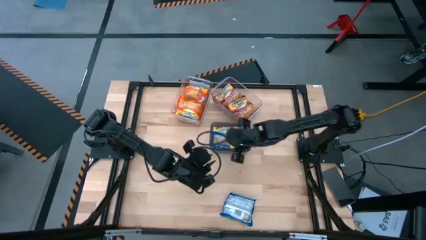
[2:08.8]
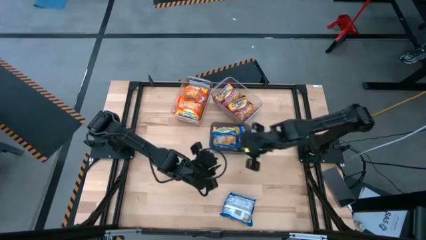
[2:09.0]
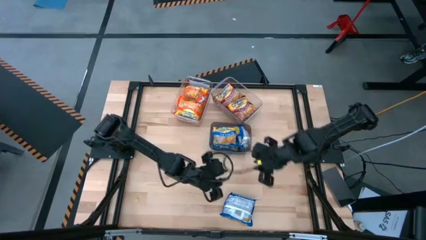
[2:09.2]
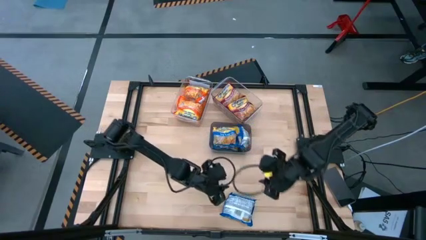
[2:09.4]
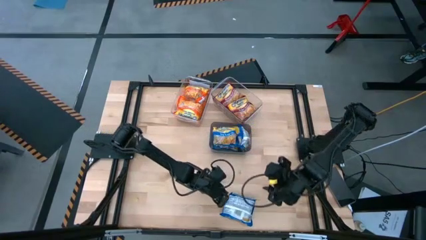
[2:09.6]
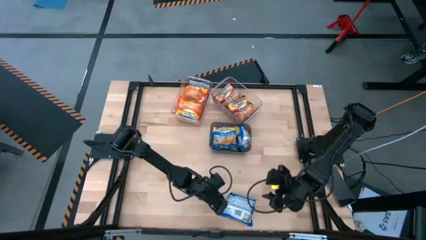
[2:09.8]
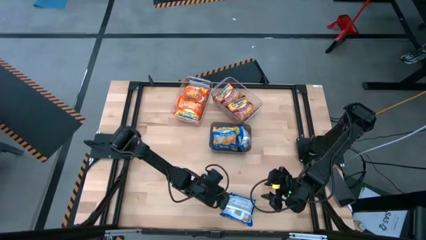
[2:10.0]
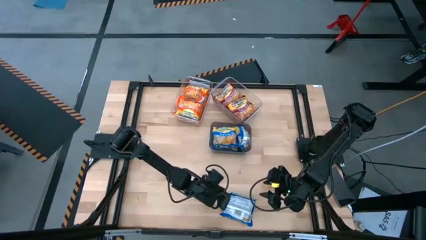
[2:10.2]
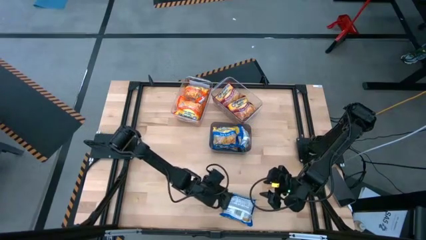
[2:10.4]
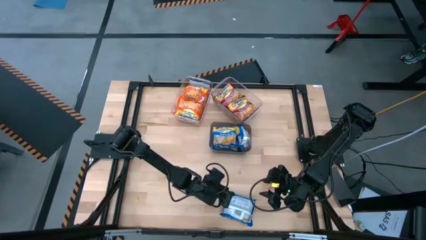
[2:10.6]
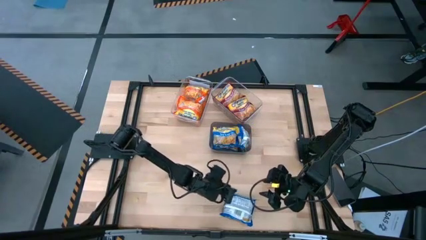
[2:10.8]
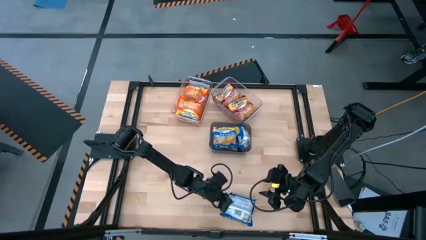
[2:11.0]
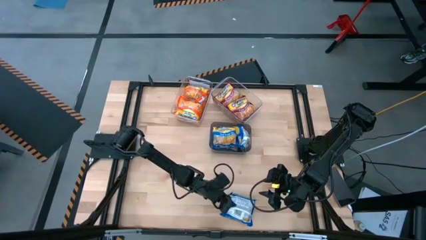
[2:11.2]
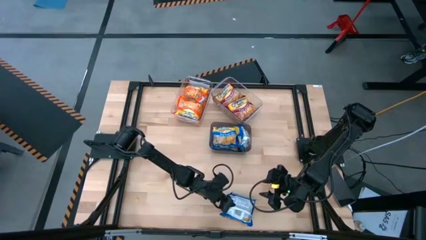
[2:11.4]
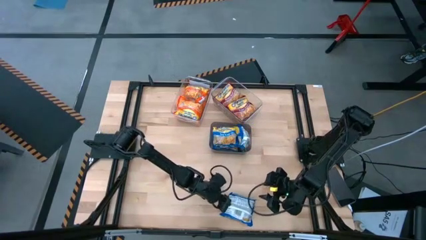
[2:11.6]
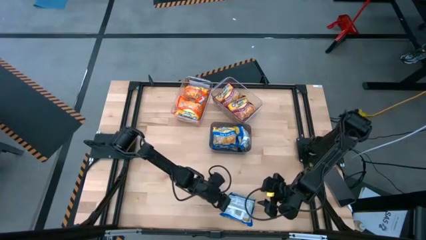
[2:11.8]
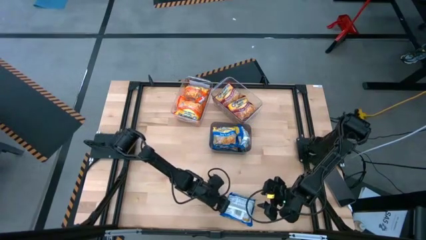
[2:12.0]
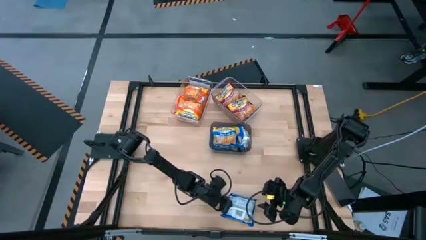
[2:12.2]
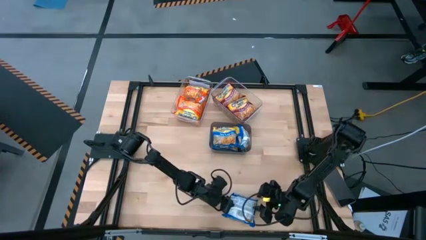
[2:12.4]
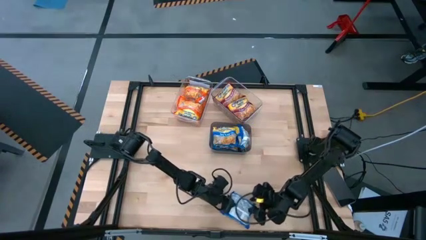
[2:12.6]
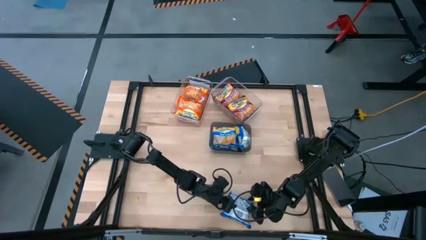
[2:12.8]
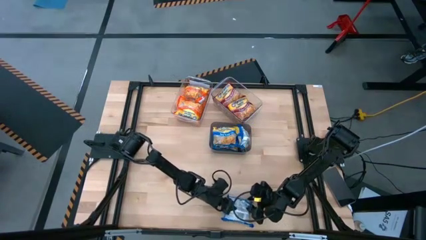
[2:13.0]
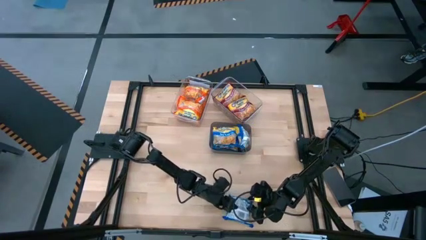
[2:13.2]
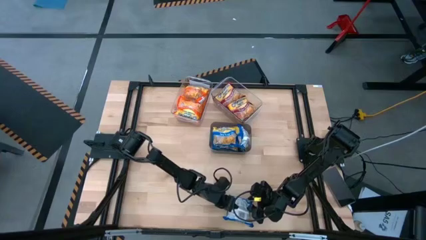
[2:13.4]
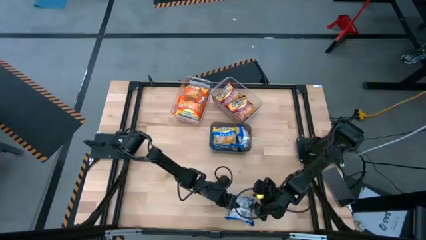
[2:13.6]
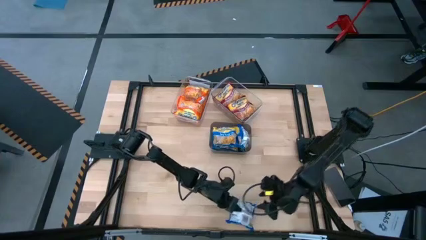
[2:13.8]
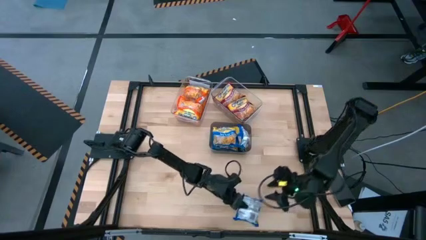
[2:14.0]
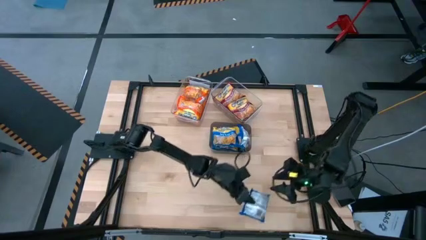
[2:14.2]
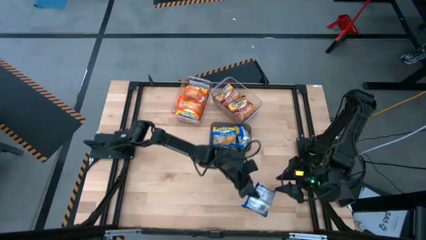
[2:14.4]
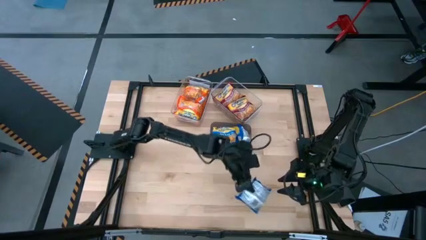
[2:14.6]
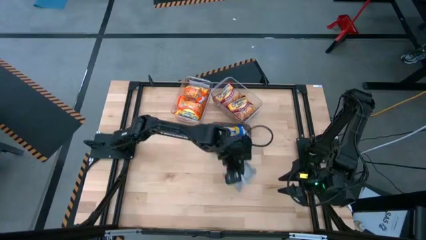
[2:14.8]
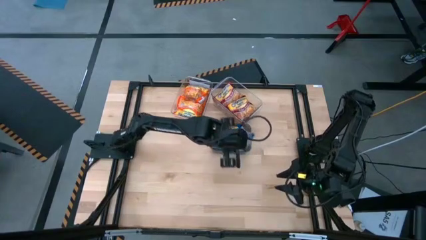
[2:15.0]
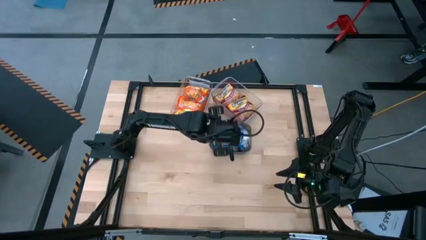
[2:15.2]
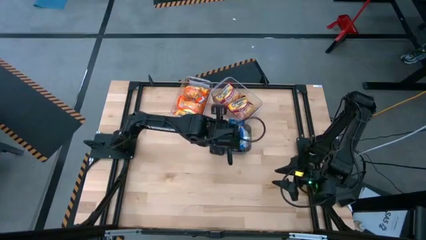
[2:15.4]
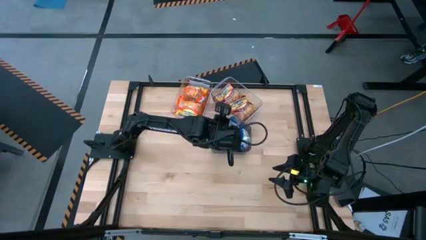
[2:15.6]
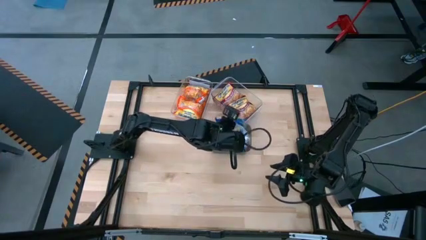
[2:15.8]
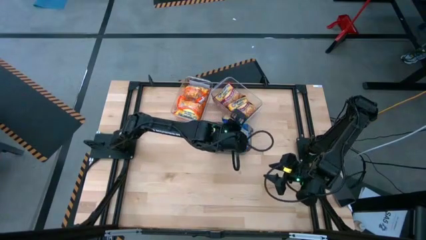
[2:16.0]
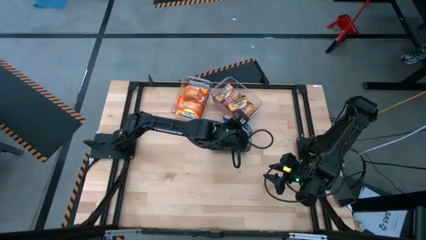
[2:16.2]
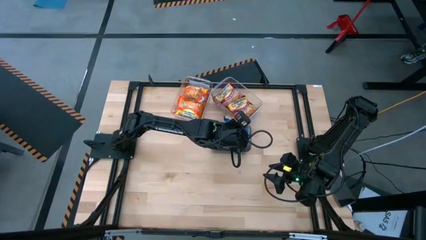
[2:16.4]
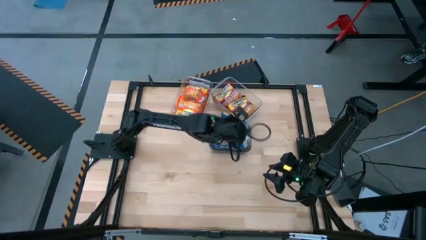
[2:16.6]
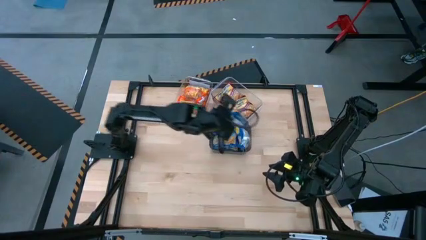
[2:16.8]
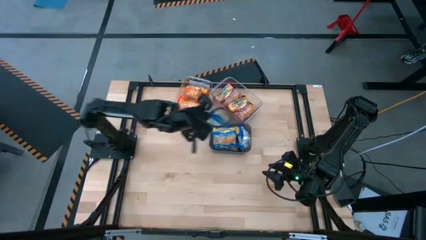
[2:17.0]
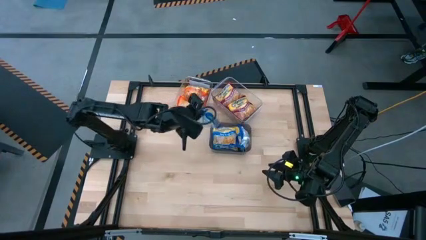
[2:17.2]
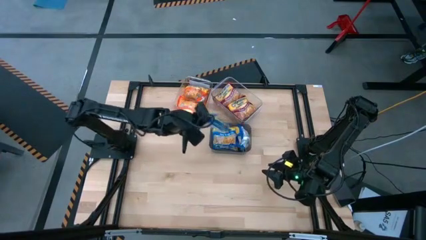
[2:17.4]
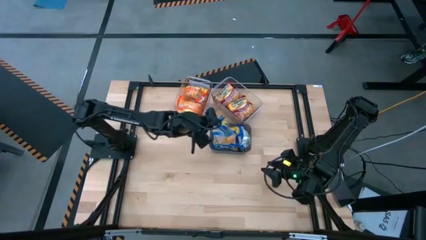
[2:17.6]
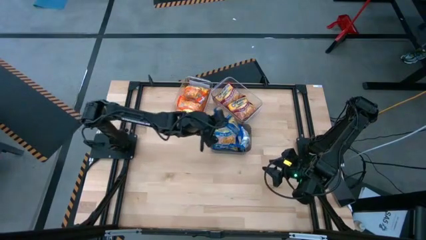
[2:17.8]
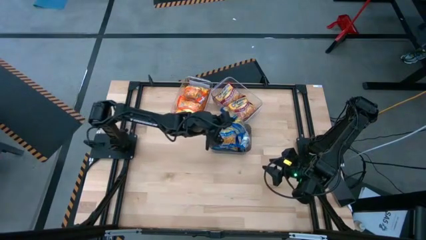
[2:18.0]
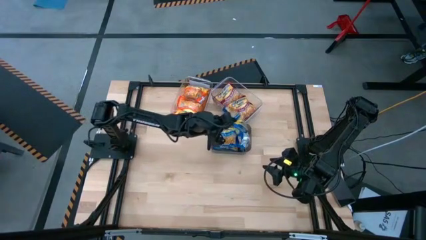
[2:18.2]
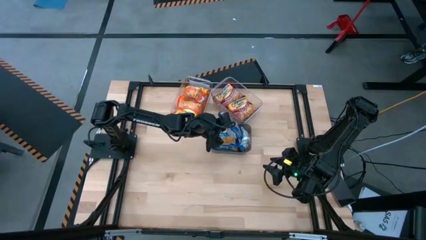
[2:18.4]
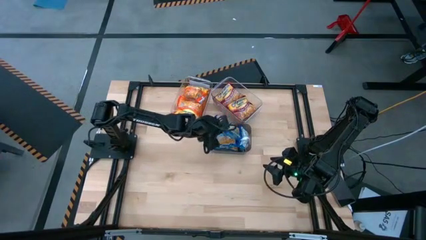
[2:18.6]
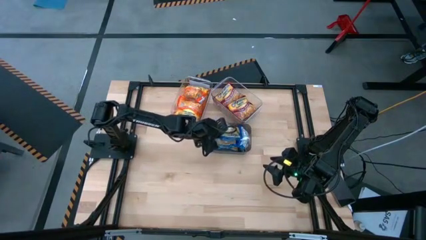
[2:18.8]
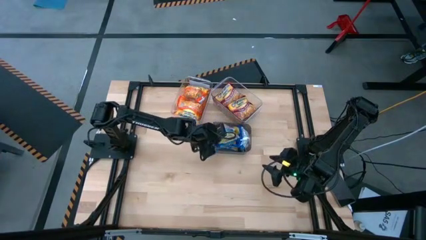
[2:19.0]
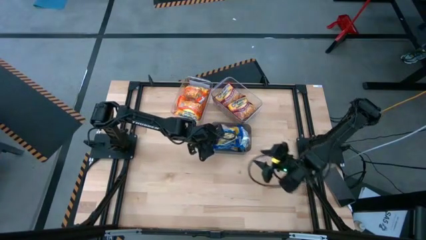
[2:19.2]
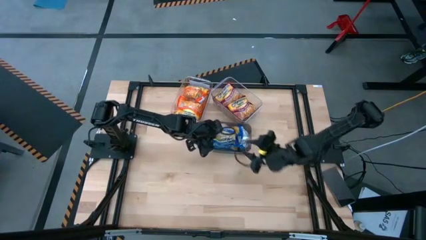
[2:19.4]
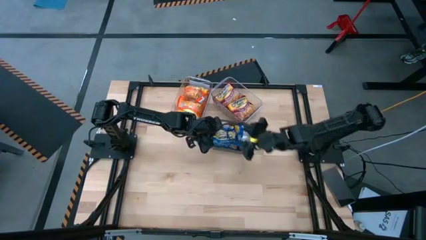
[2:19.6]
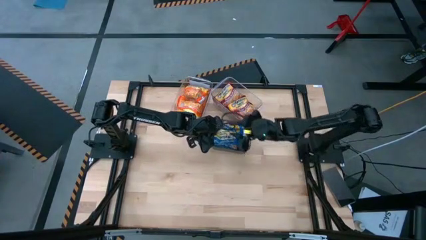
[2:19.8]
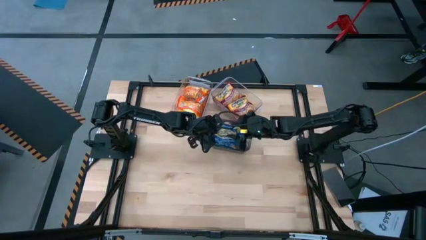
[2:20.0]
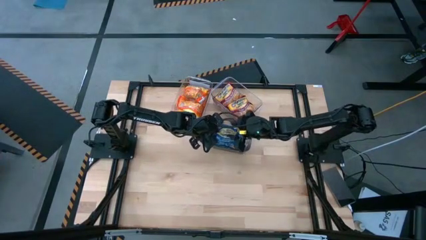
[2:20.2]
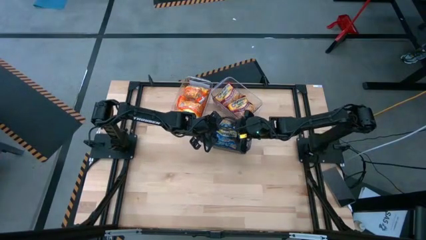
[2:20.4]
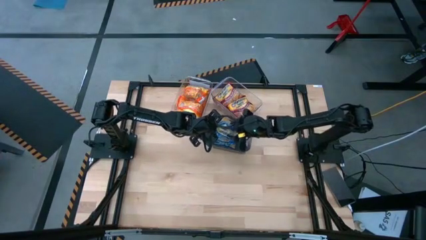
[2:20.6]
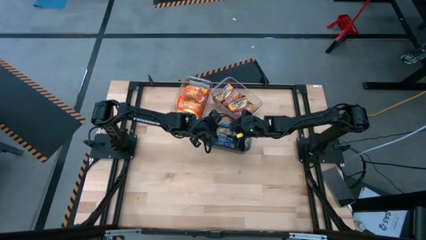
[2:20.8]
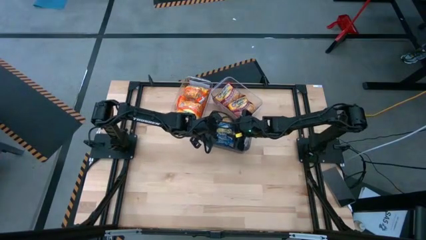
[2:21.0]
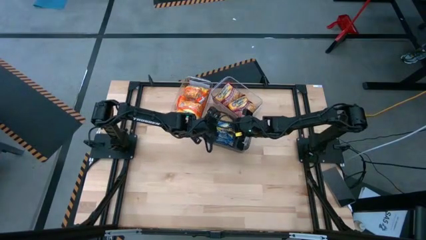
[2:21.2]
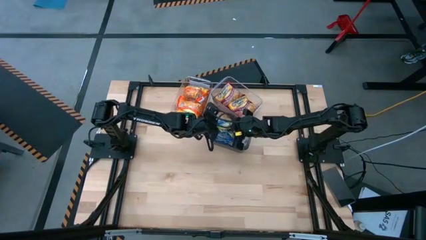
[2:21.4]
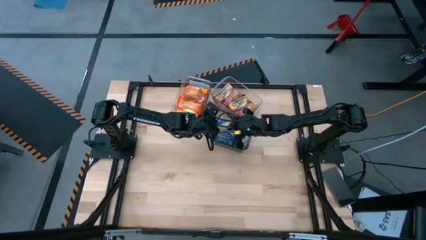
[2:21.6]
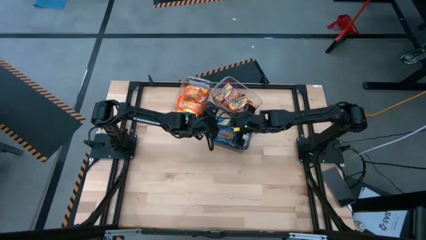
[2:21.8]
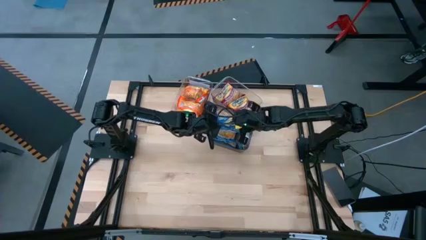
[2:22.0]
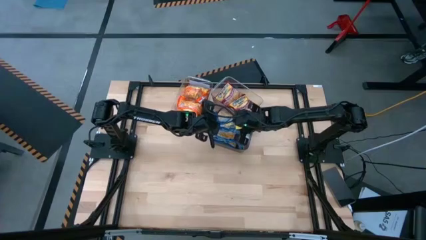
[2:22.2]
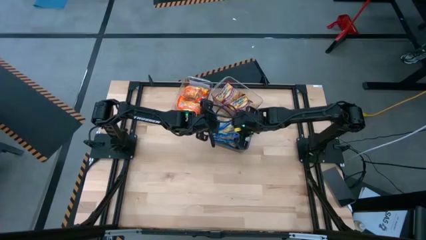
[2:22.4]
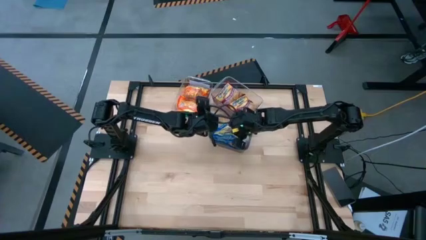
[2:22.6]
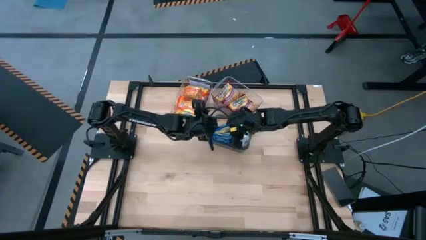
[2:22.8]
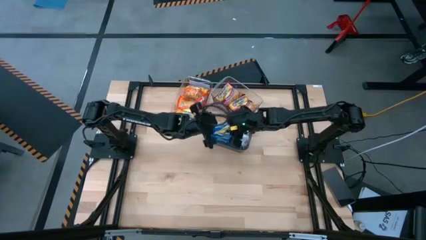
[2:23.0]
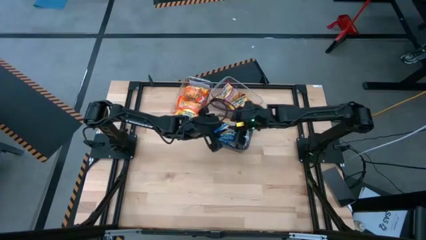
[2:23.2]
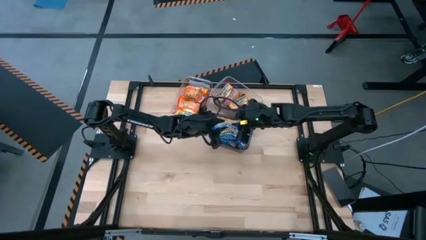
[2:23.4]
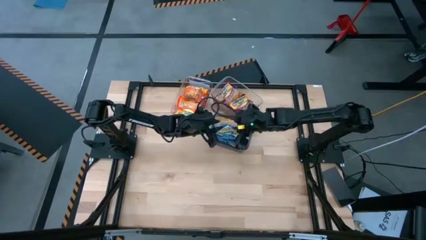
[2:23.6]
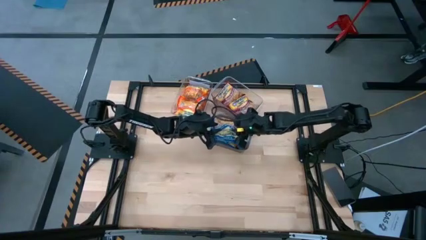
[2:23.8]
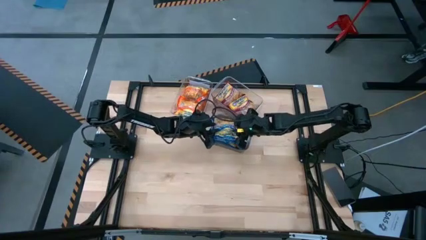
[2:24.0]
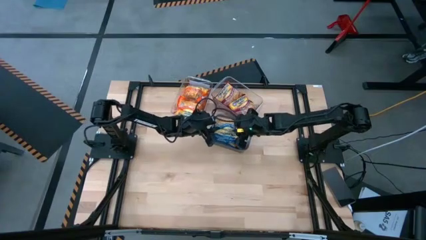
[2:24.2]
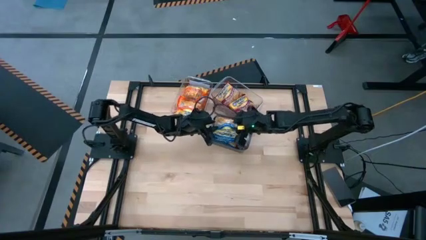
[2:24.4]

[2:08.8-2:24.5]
Task: Sort Maruchan noodles
Put the blue noodle pack into the black transparent bin
